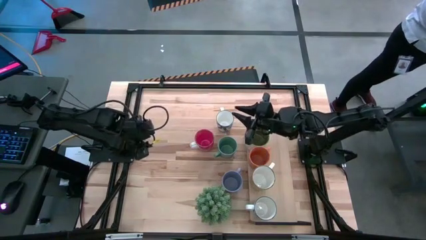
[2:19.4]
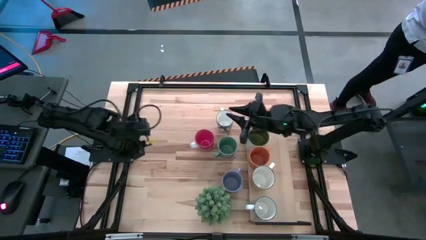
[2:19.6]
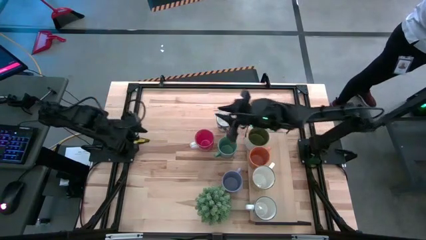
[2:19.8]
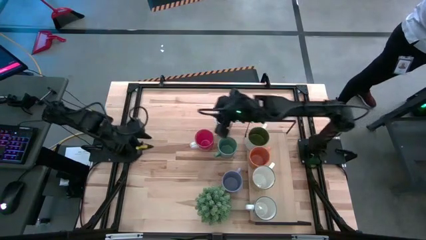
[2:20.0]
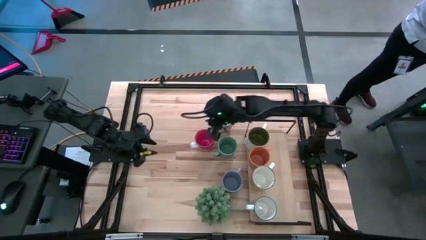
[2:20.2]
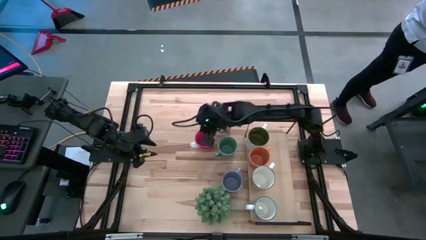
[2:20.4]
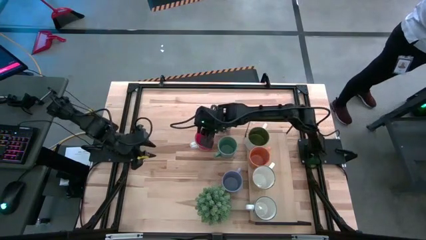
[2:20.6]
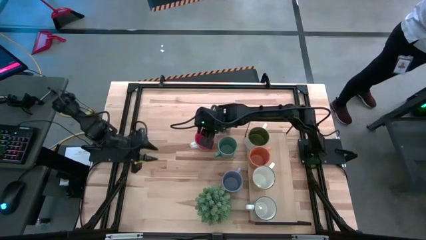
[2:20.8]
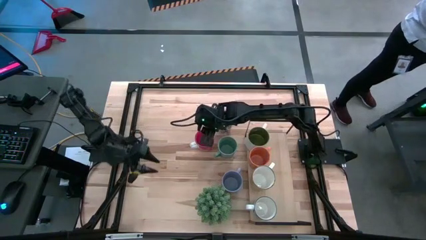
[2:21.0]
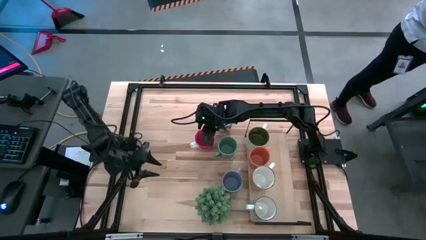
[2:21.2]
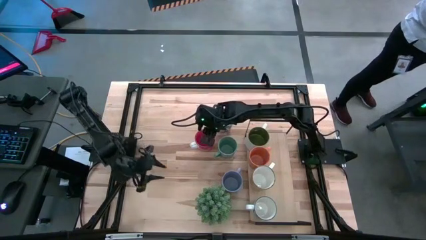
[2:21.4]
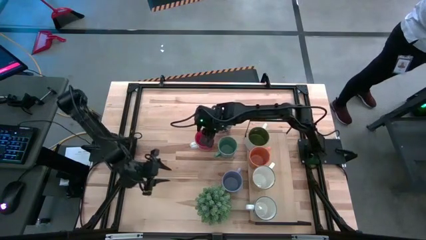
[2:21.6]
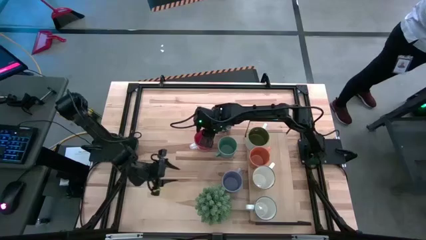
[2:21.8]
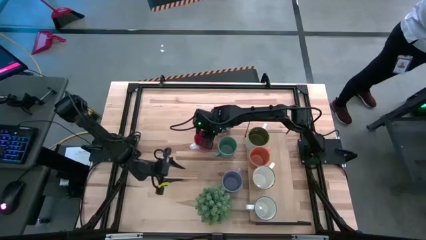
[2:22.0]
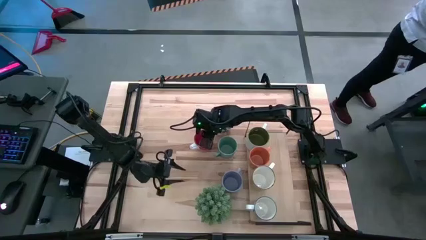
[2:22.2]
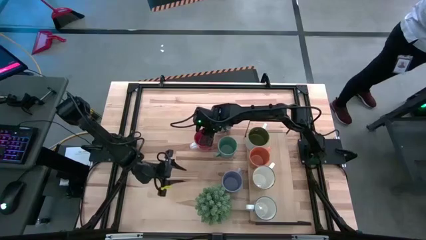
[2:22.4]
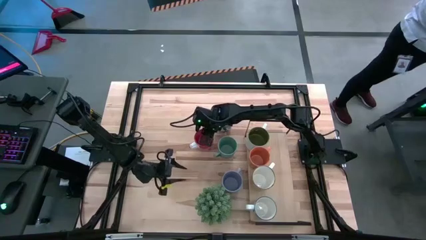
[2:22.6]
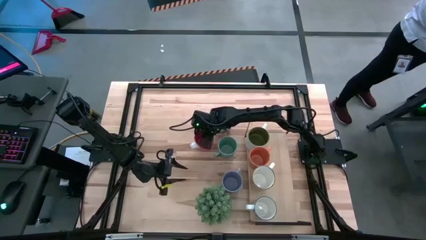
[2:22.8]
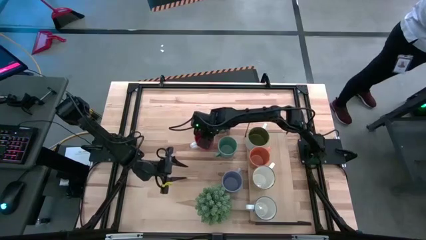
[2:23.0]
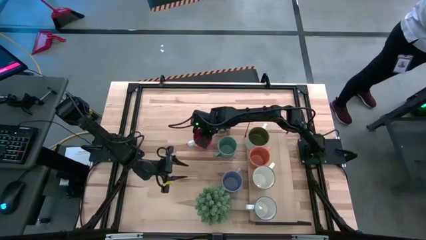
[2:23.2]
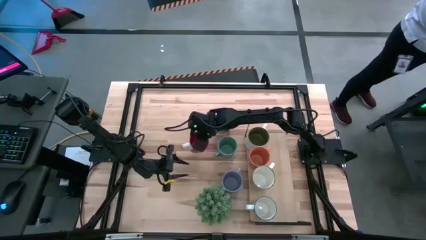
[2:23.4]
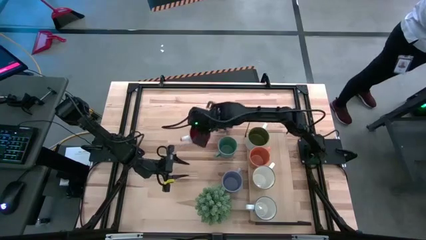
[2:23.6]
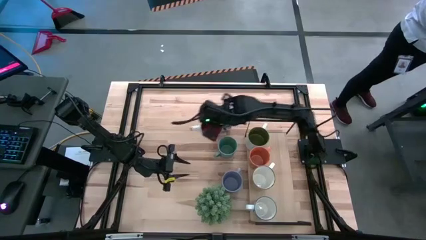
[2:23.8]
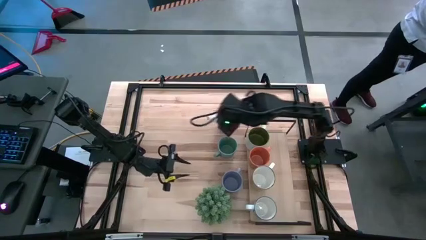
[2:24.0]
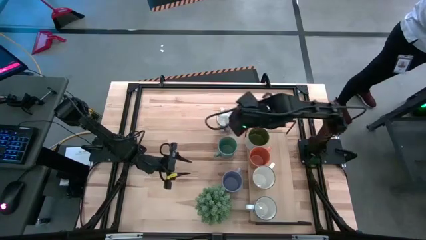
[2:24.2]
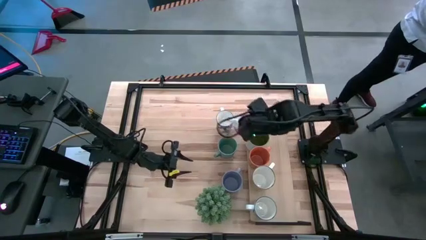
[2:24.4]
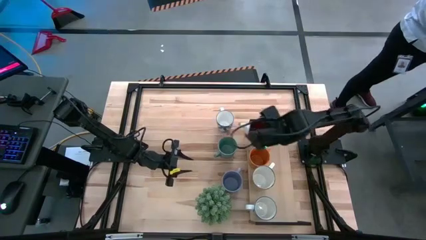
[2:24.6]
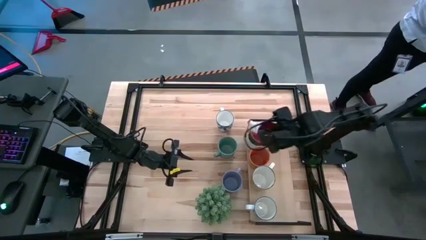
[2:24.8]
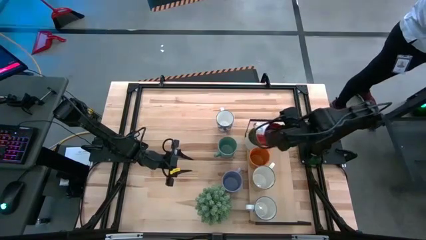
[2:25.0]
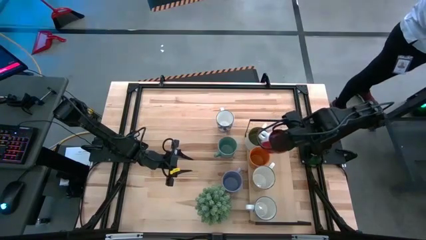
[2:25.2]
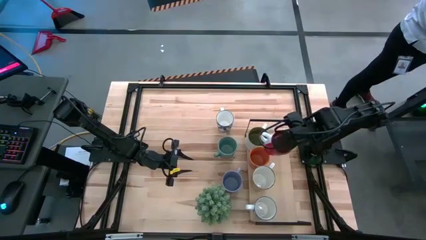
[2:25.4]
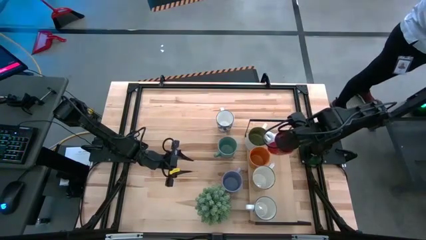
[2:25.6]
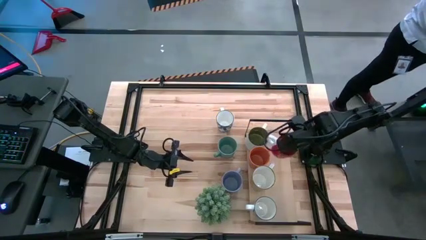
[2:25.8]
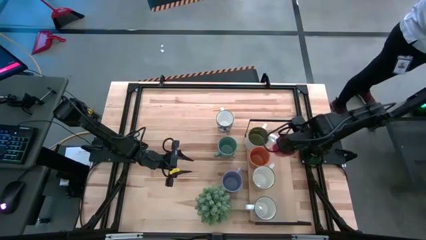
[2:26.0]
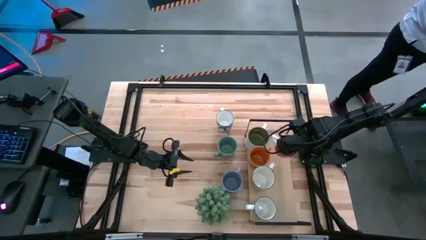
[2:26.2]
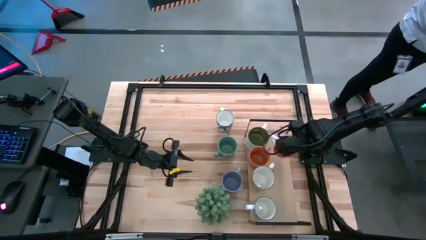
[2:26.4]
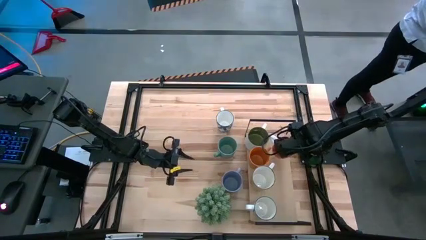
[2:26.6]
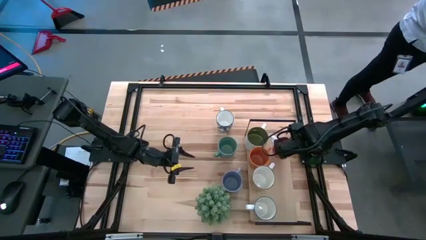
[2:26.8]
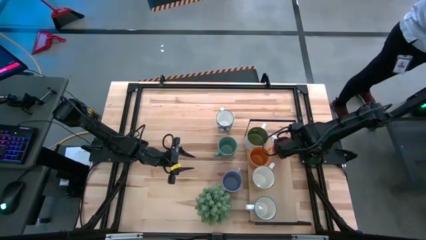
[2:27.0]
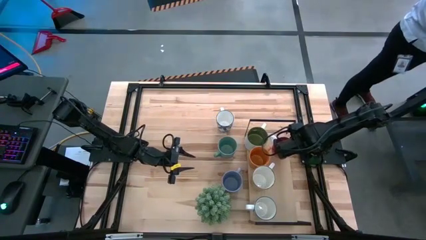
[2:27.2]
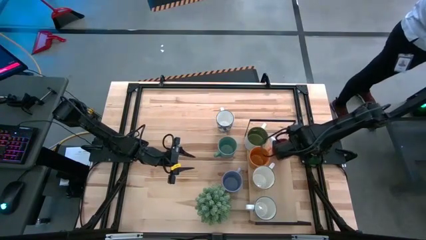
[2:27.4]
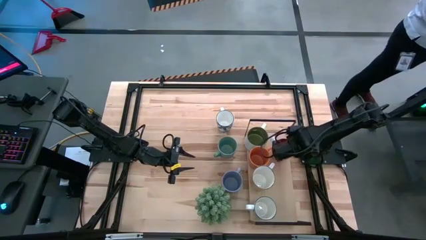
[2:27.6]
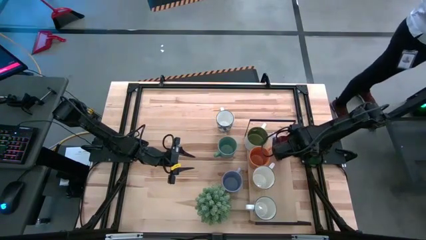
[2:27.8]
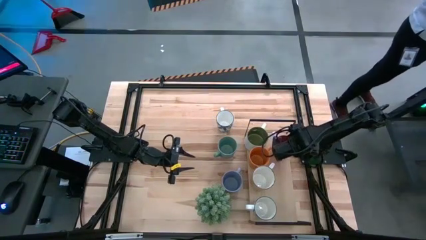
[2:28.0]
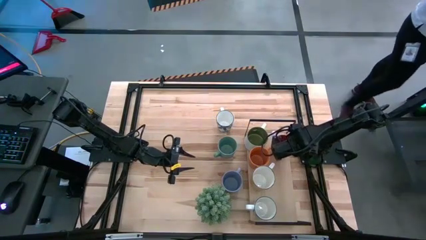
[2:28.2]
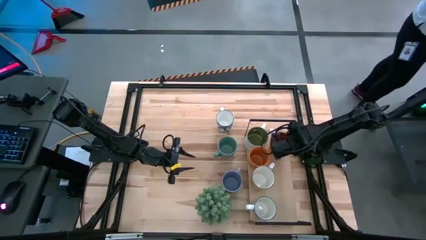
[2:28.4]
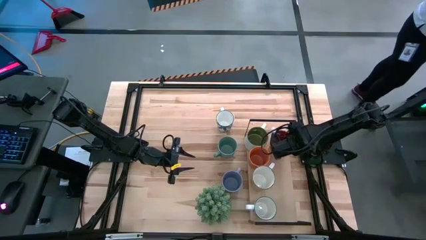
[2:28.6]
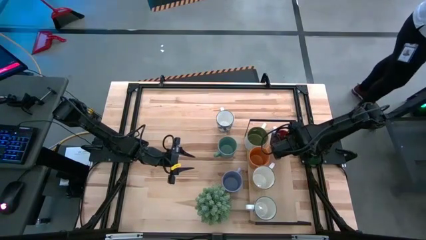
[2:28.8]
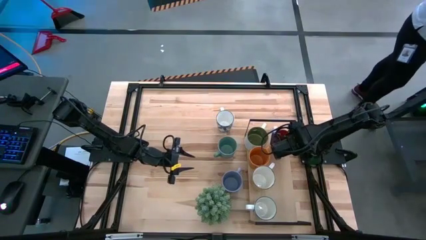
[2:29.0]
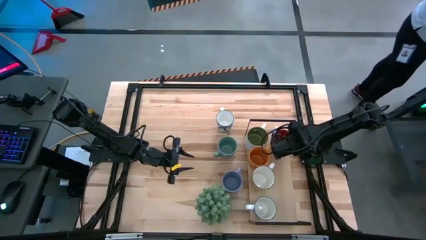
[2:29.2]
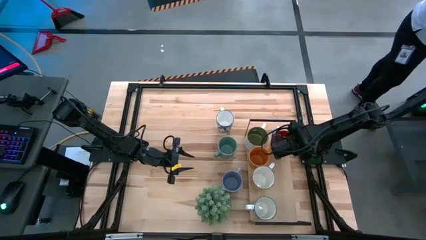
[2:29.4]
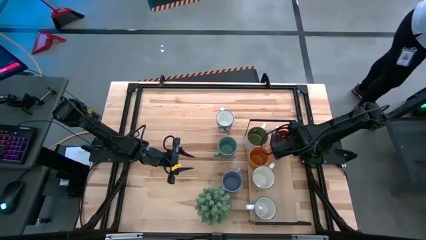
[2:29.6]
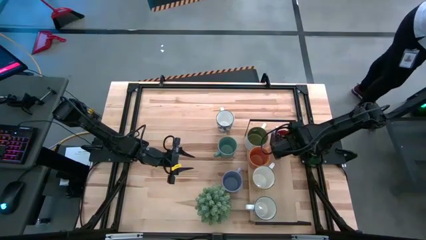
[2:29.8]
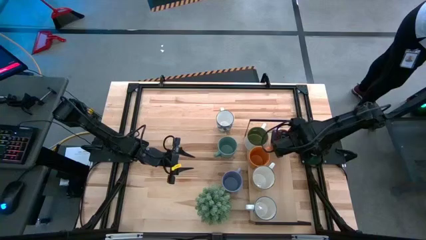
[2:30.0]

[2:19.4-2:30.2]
Task: Place coffee mugs
Put the red mug on the shelf

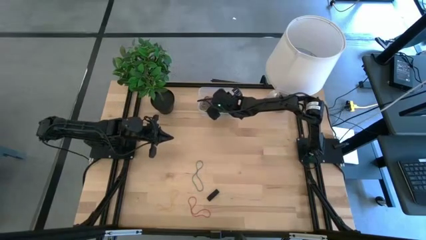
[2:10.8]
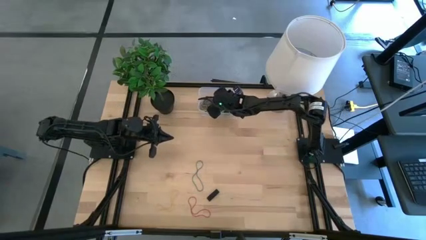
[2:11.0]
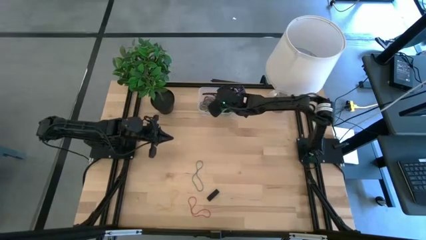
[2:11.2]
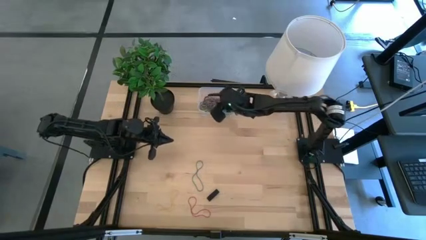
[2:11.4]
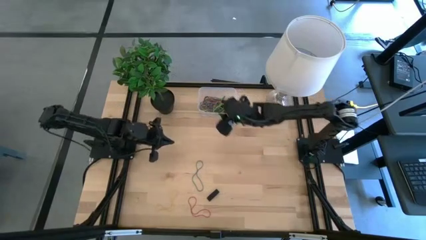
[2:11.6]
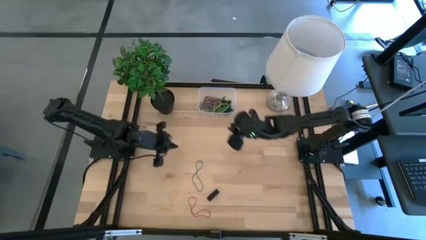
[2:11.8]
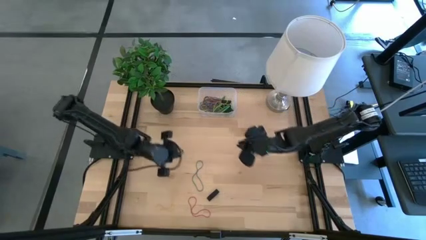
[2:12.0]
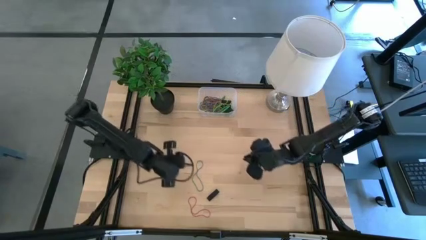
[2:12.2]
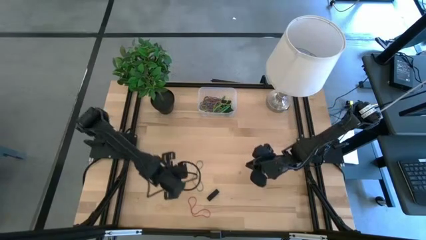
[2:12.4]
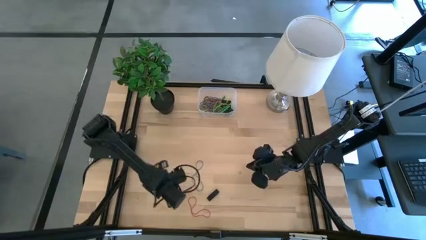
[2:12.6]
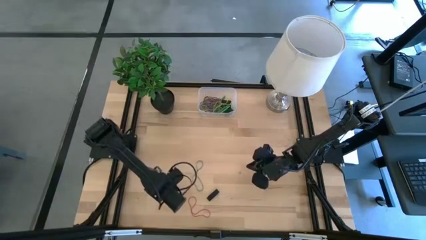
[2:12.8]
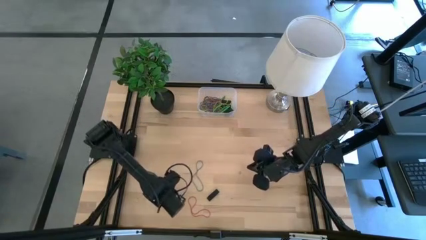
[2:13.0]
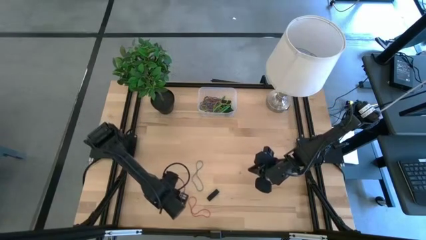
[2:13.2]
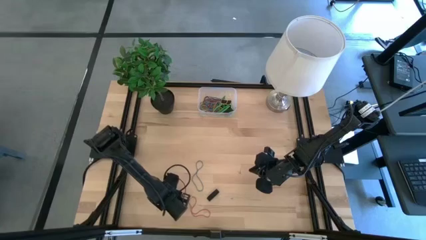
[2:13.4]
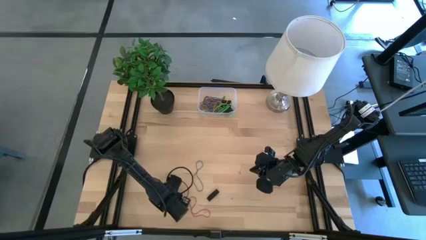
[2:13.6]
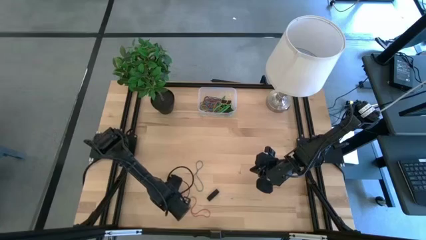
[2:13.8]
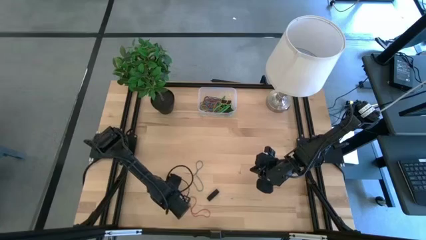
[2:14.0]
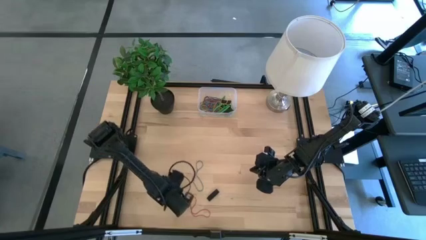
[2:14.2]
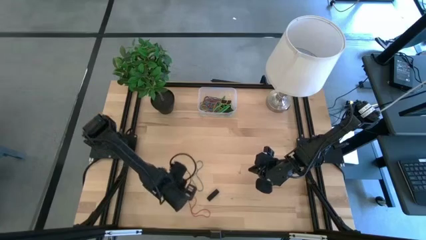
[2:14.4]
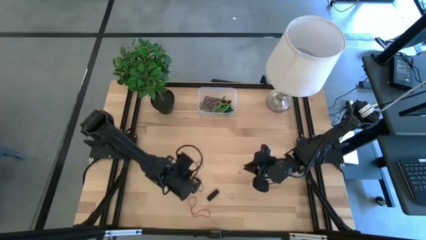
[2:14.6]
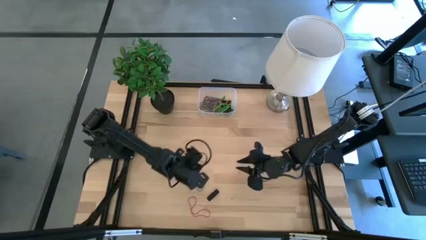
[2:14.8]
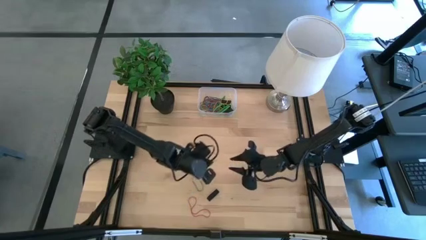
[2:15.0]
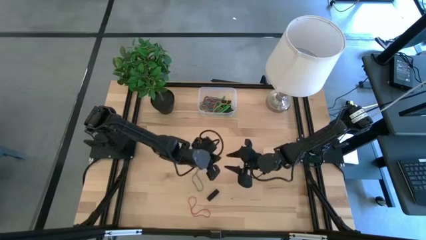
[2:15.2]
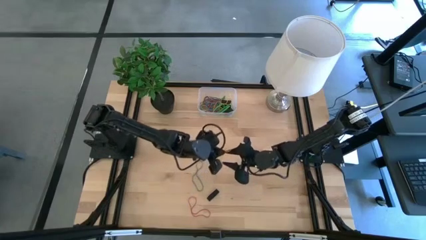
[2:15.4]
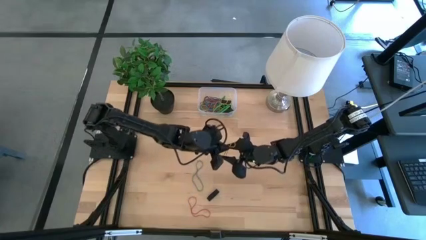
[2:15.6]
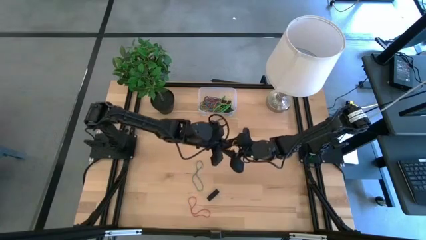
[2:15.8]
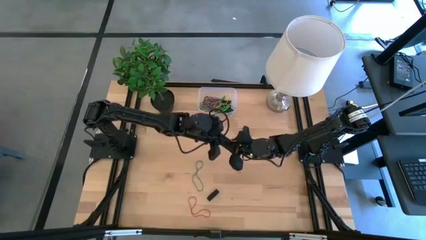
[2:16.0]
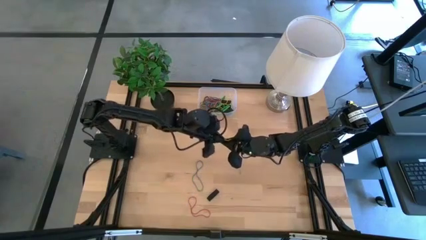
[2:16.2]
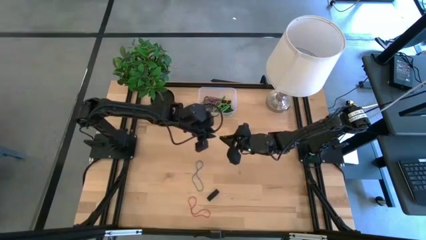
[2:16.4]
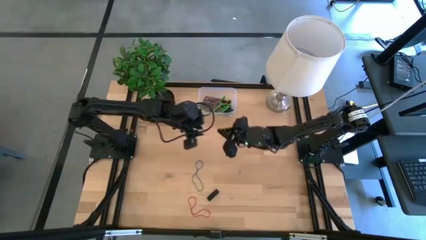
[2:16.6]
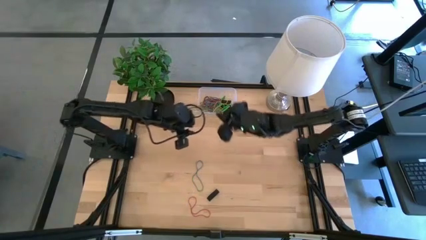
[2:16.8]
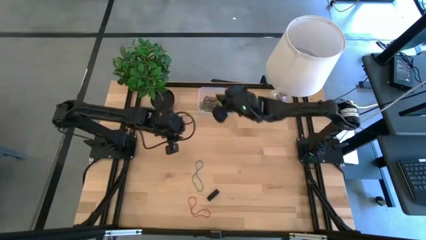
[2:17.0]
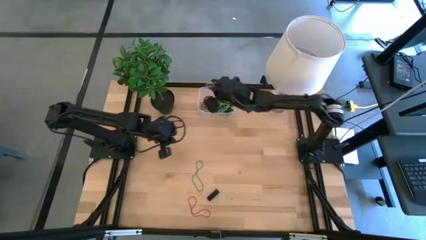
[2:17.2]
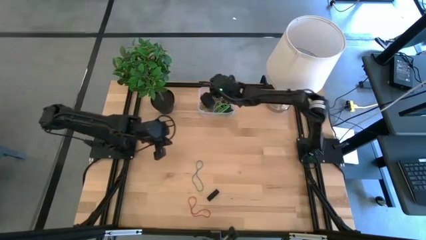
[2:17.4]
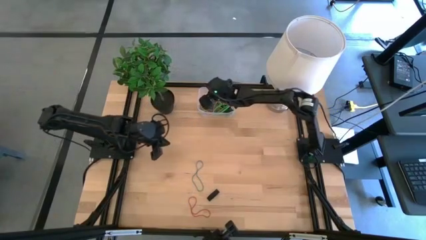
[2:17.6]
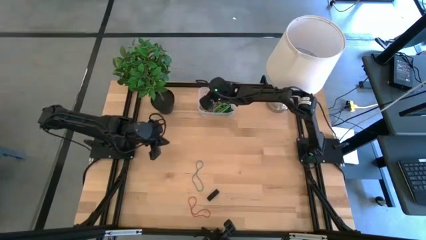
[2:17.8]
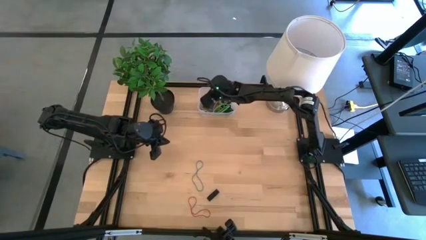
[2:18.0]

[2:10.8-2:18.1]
Task: Pick and place rubber bands into bin
Put the yellow rubber band into the transparent bin
